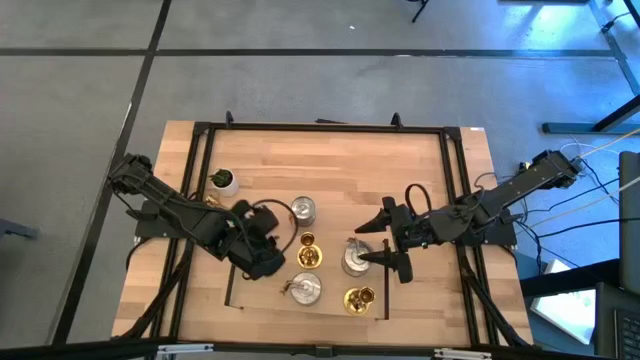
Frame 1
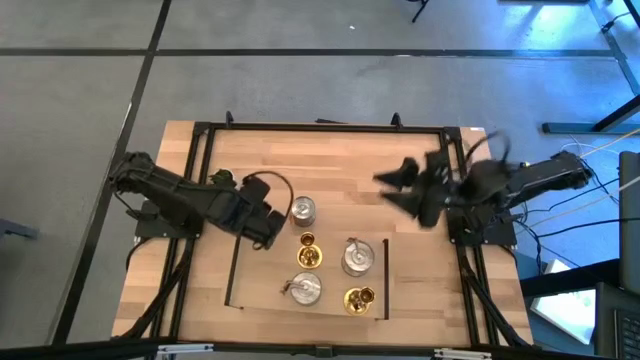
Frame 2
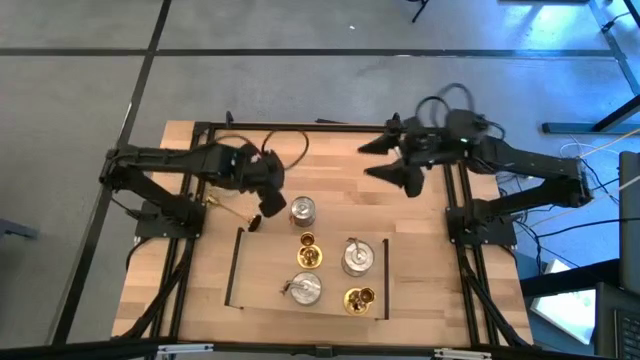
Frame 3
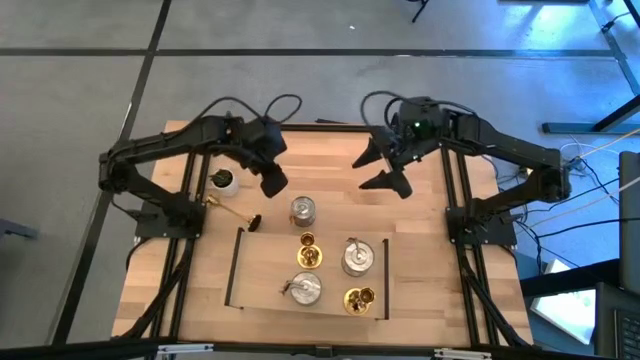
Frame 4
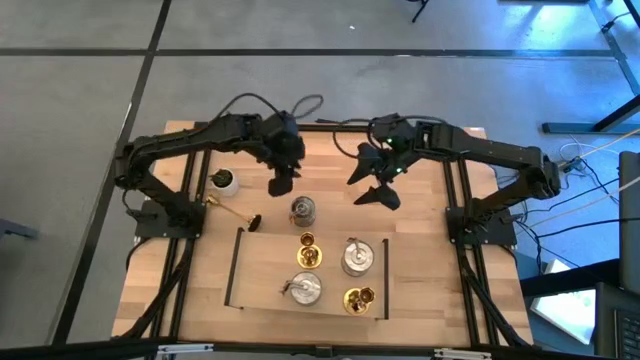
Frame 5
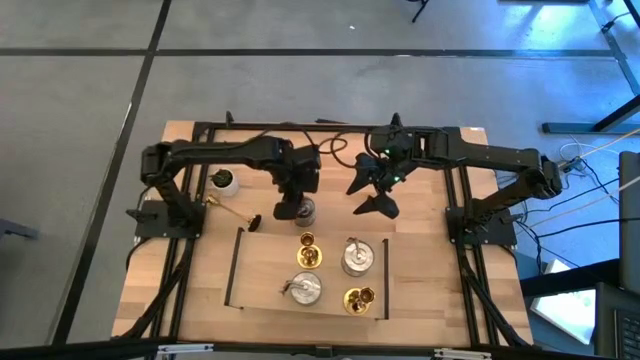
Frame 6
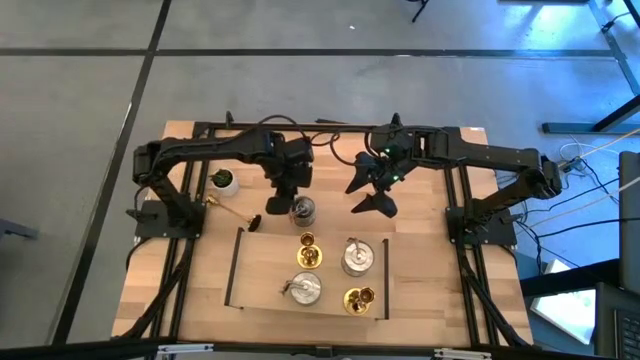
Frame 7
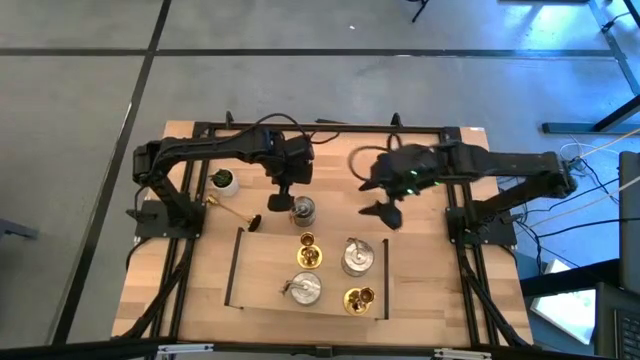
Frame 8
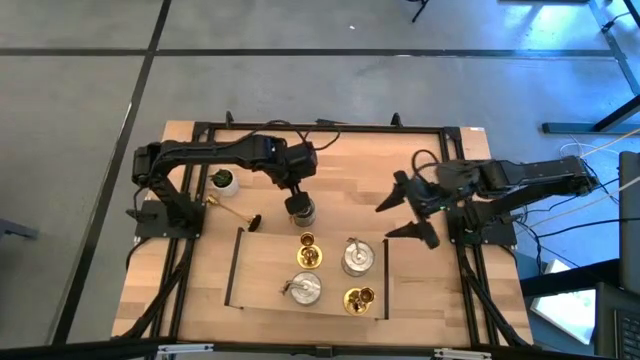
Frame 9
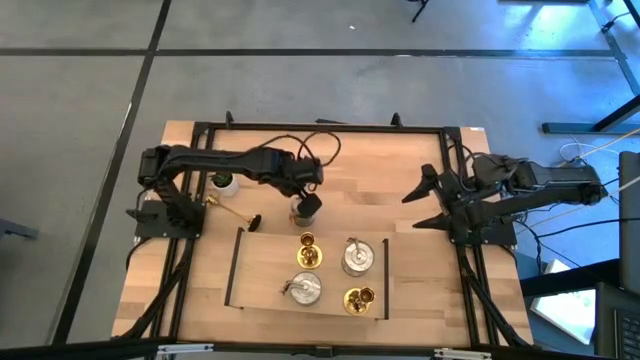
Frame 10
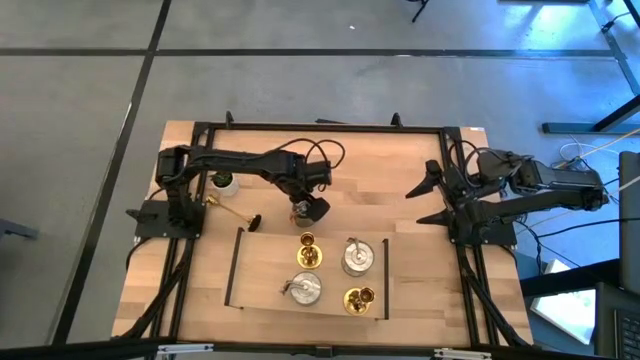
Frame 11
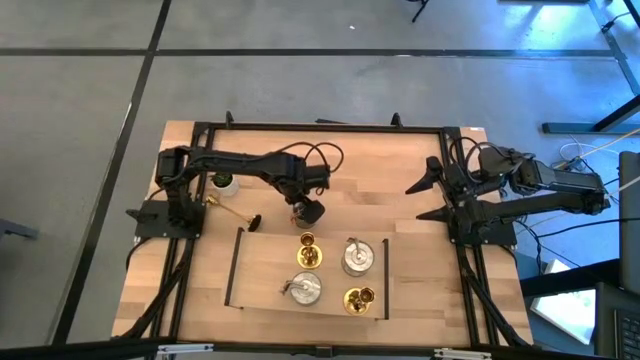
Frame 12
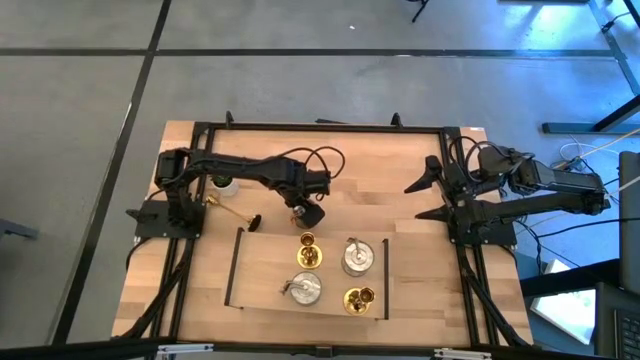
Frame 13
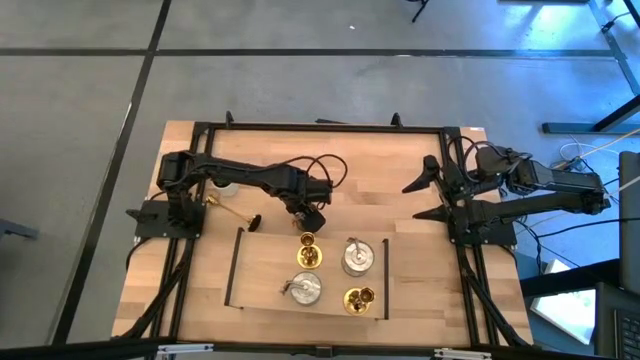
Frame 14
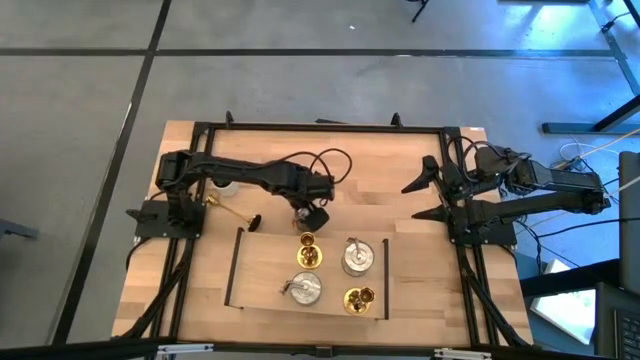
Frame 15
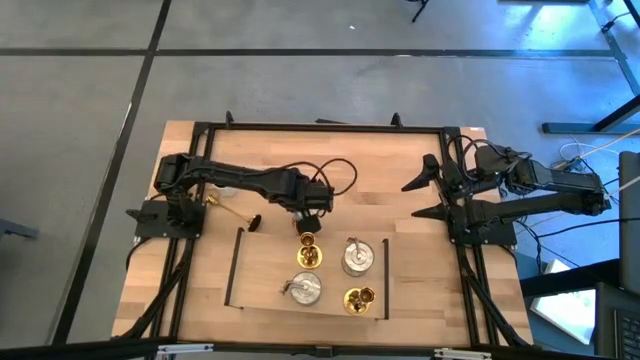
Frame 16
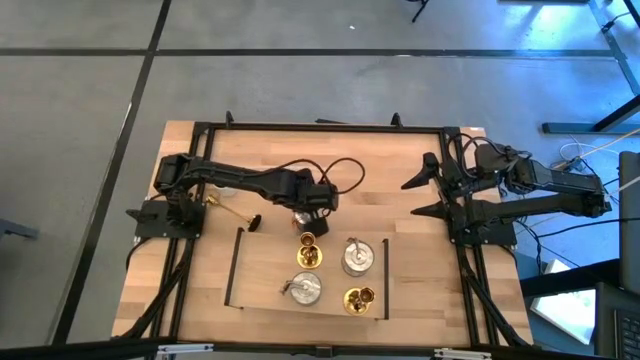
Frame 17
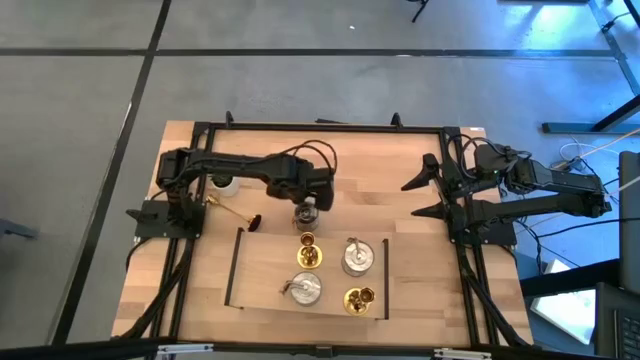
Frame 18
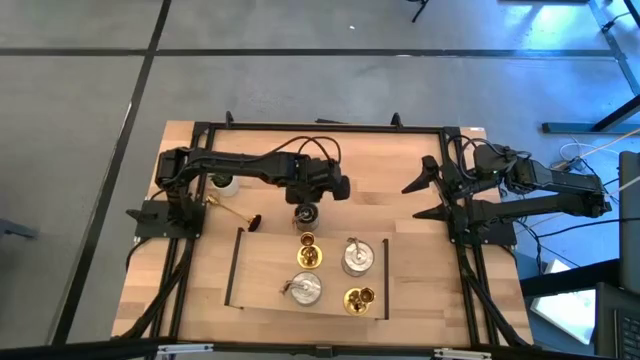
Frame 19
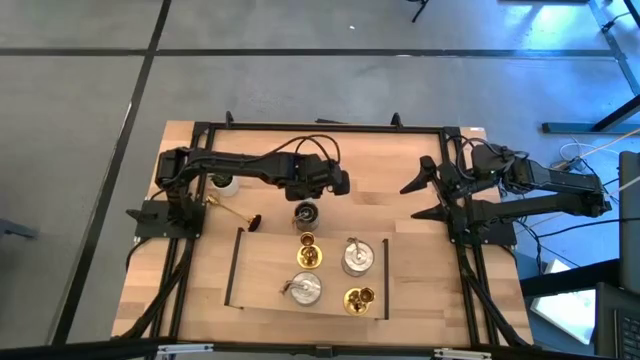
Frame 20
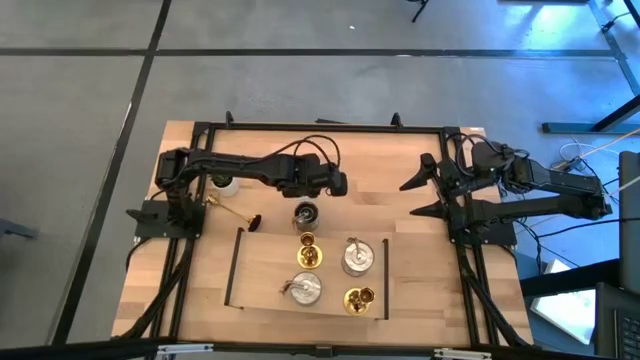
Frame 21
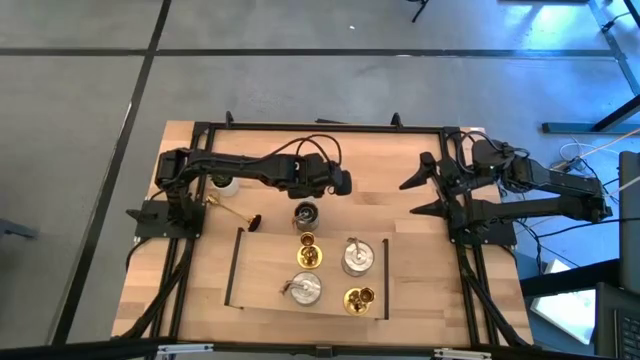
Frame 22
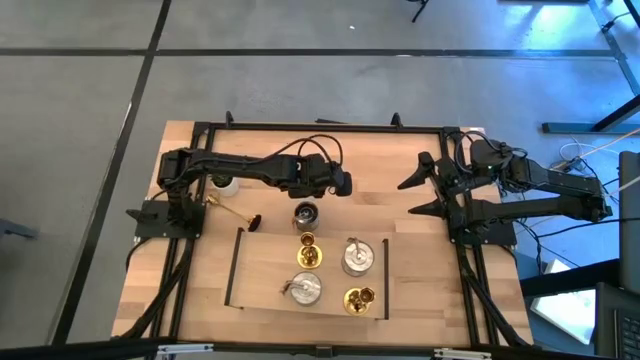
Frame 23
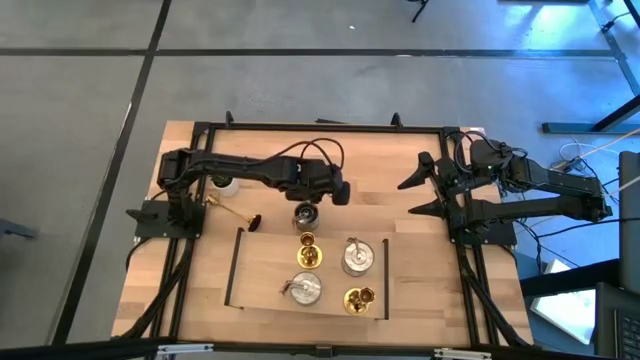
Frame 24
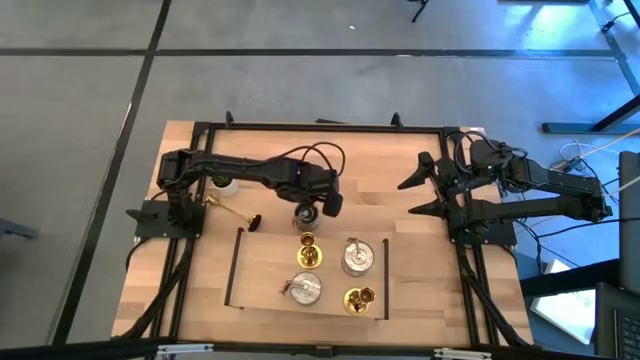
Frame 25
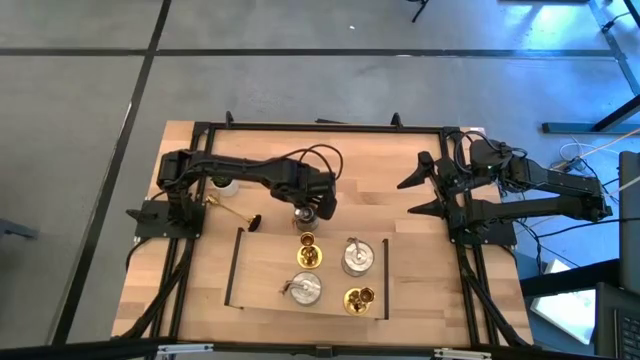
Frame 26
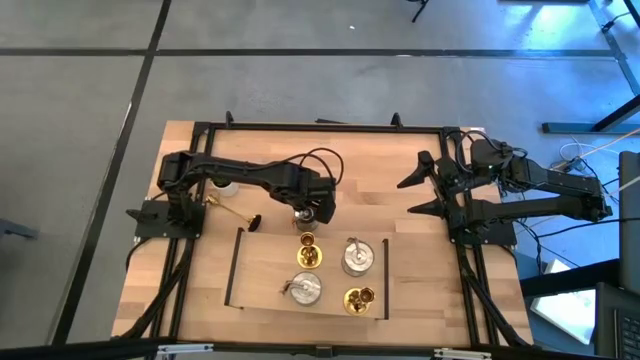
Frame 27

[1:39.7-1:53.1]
Task: Pick & Place candle stick holders
Put the silver scented candle on the shelf

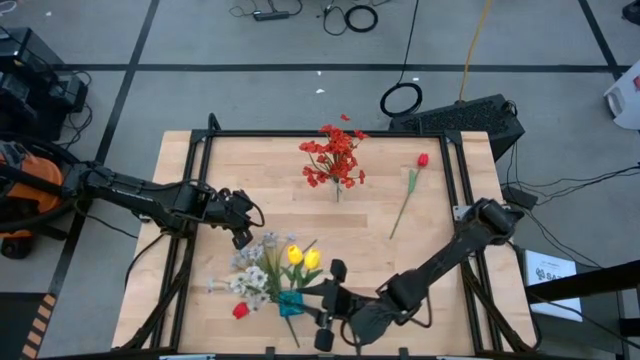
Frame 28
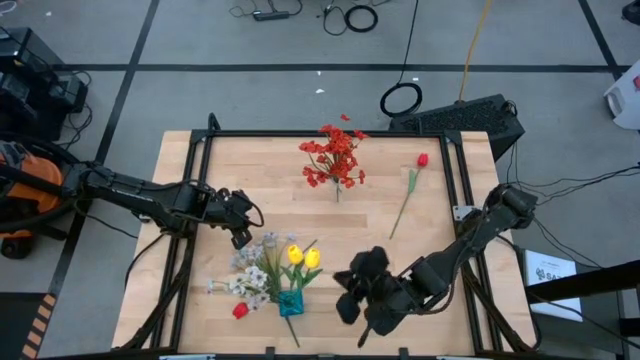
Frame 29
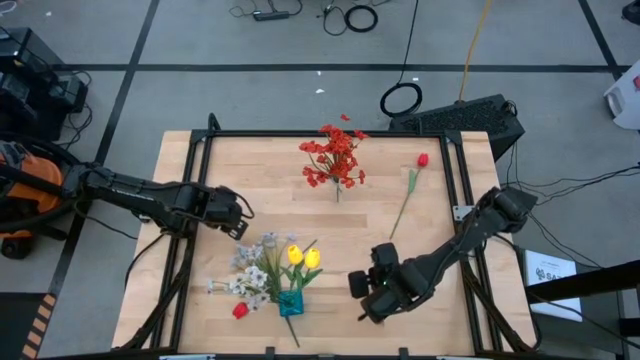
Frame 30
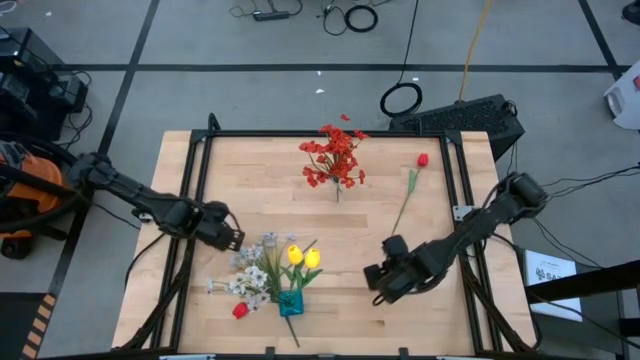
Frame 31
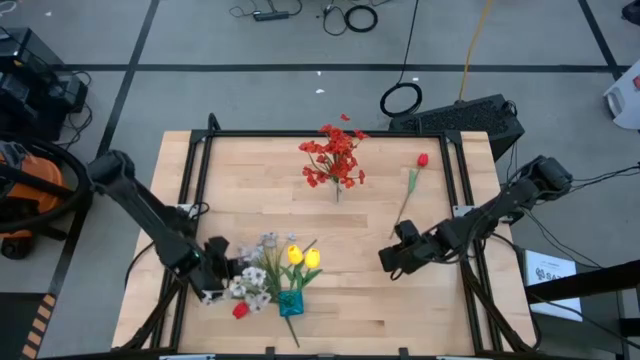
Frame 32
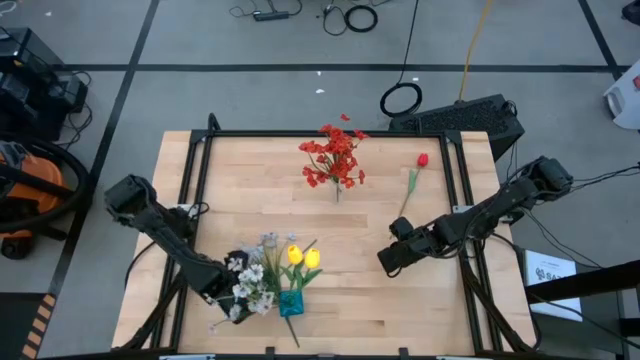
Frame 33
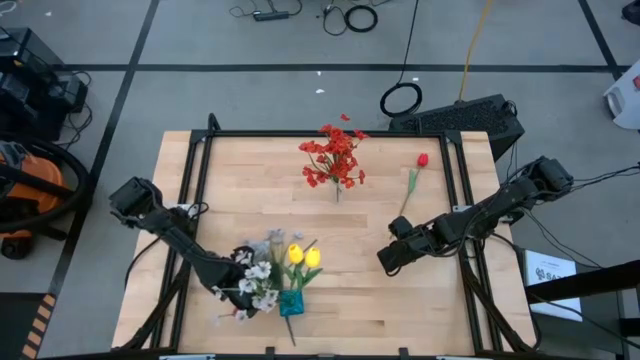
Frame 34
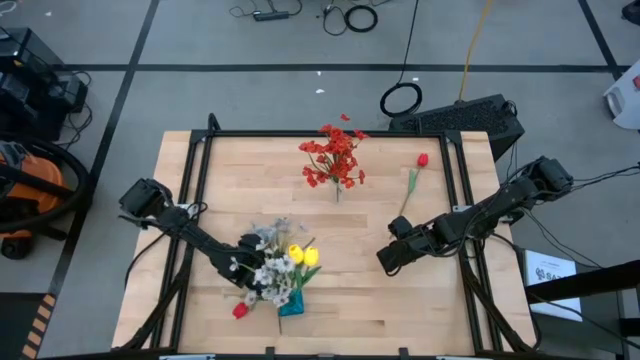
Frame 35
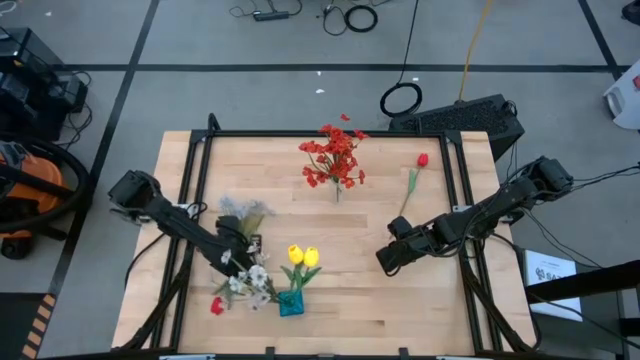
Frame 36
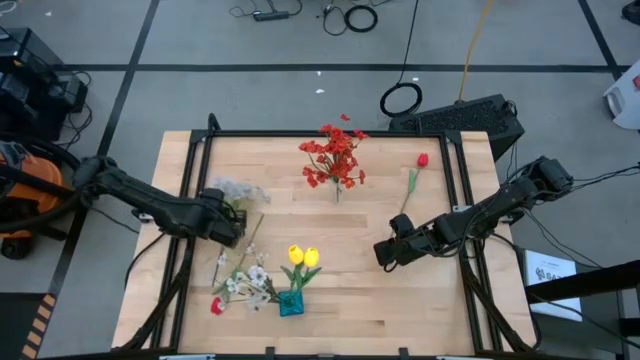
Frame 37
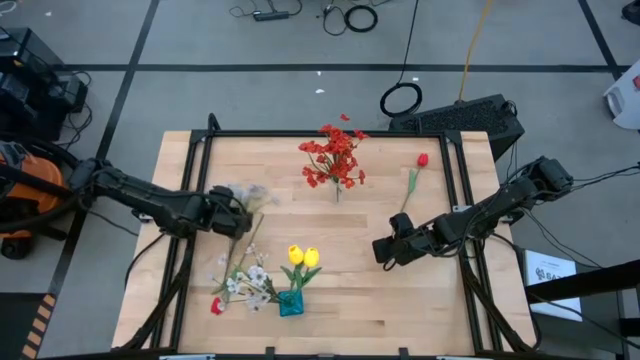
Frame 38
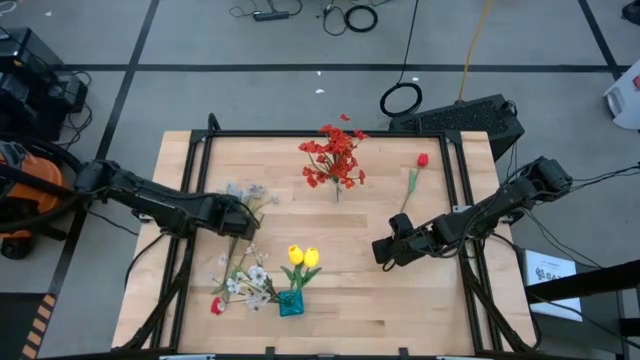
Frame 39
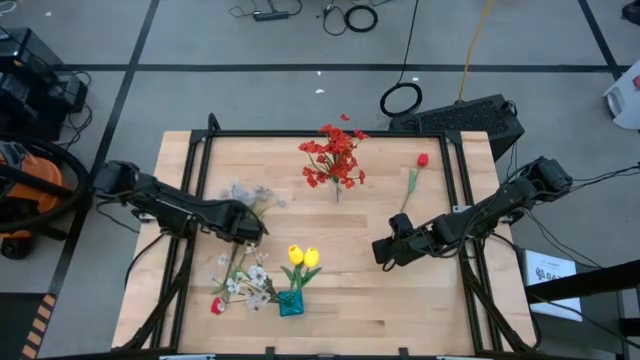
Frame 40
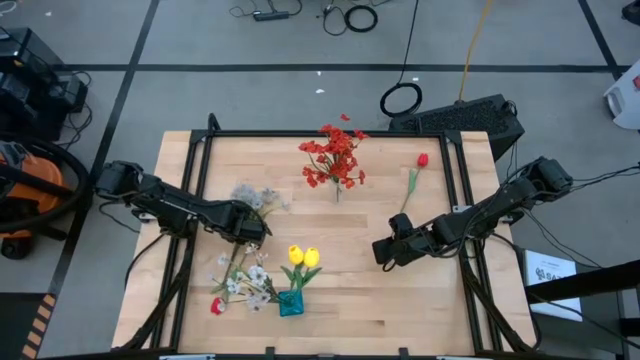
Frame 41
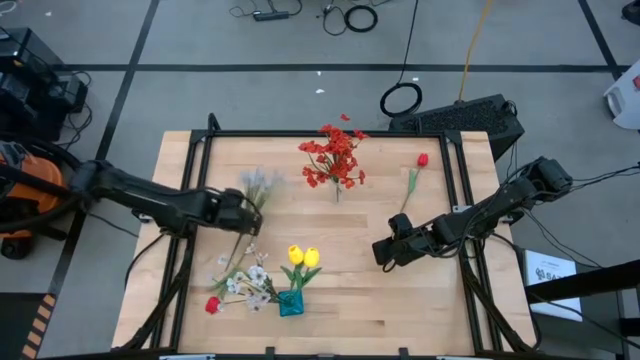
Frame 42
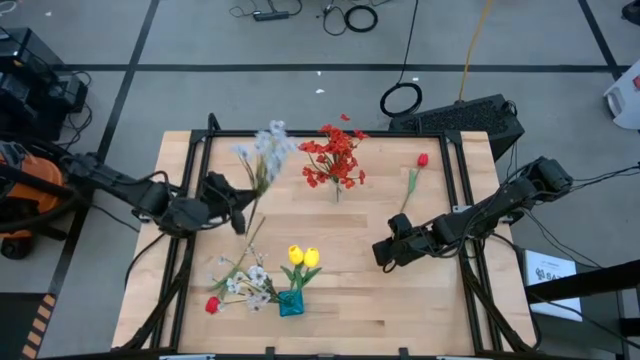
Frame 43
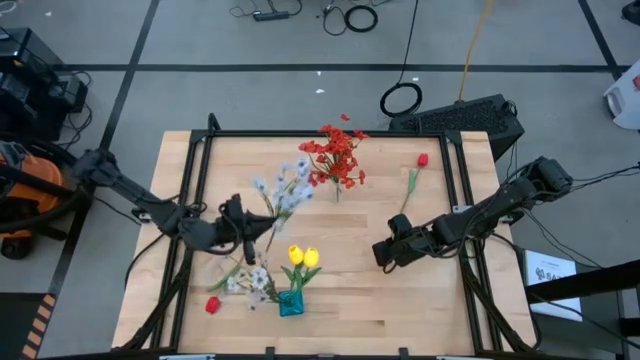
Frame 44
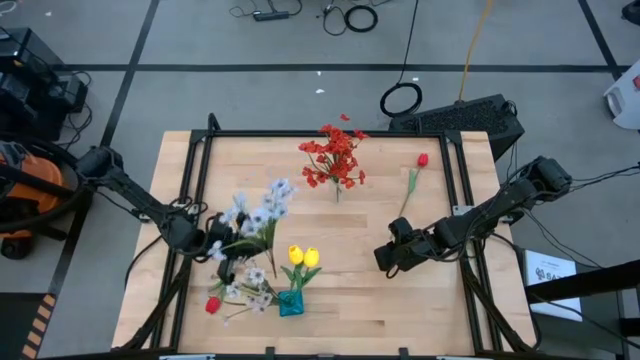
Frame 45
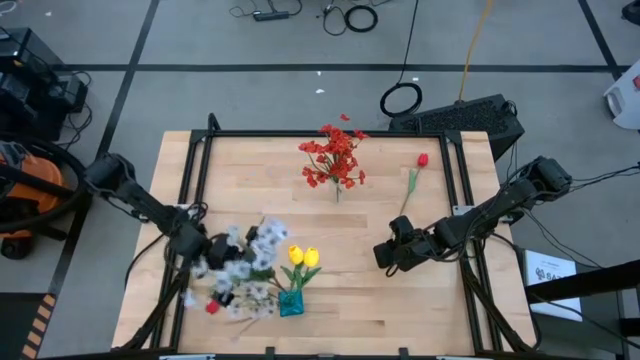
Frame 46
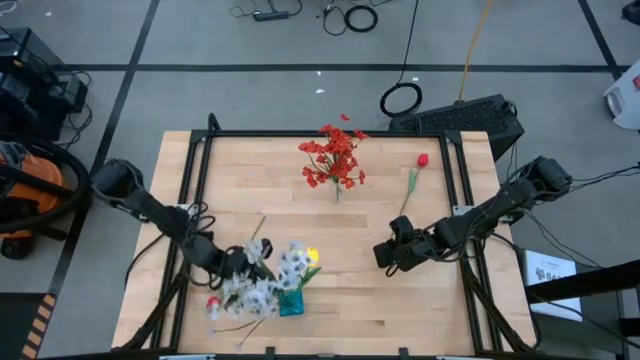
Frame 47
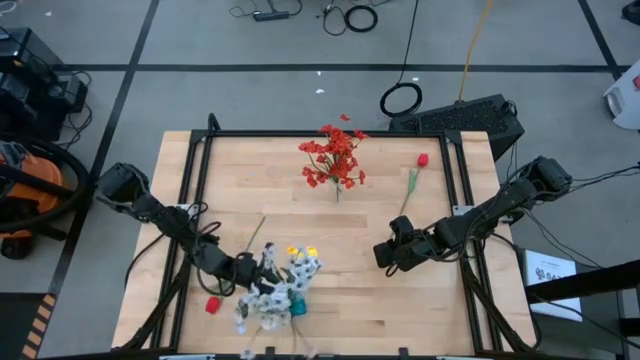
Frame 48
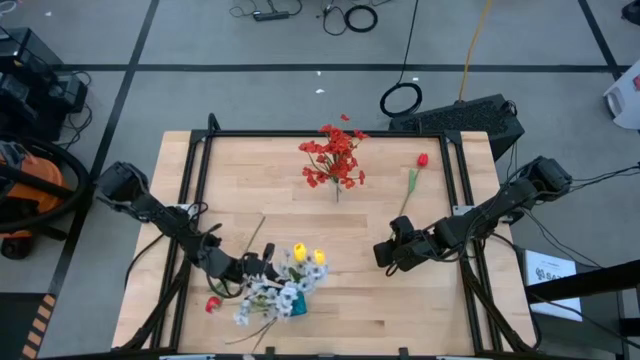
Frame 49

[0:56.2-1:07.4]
Task: Sort flowers into vase by color
Put the white flowers into the blue flower vase
